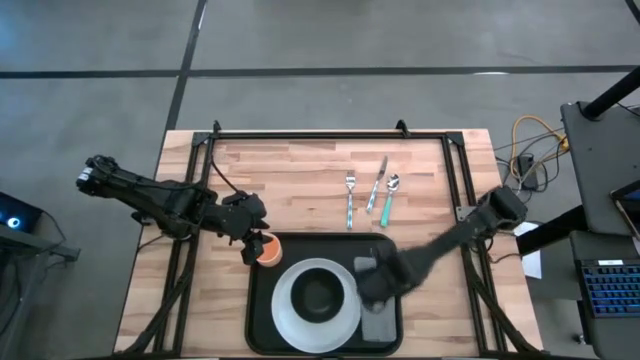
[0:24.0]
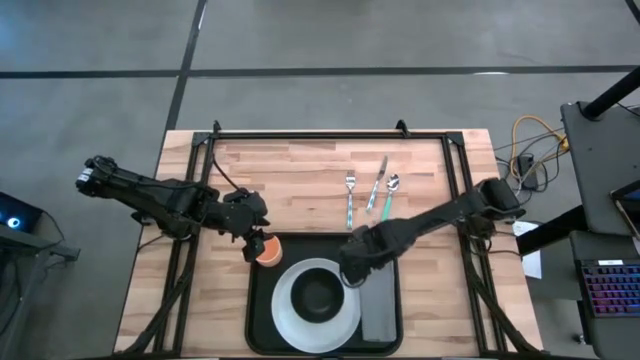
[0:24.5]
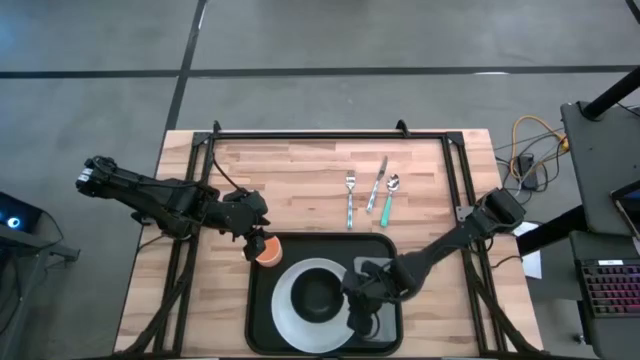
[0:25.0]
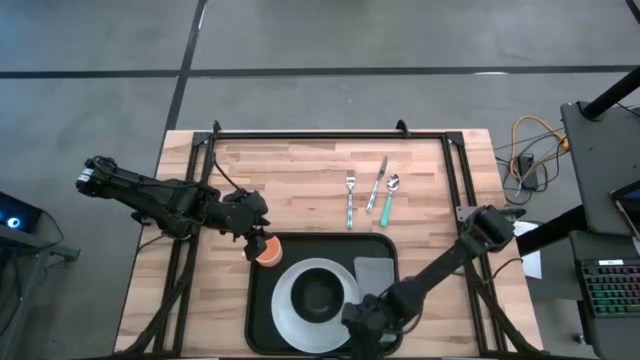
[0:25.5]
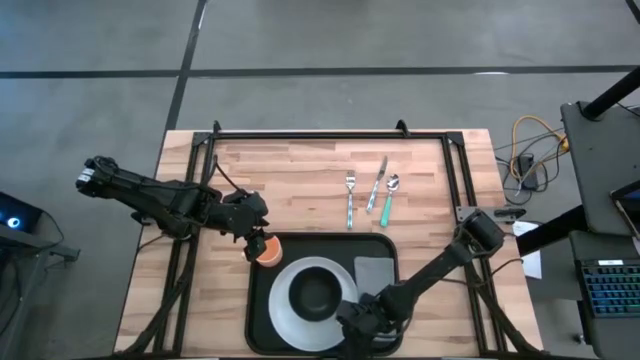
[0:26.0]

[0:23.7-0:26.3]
Task: Set up tray
Adjust the white plate

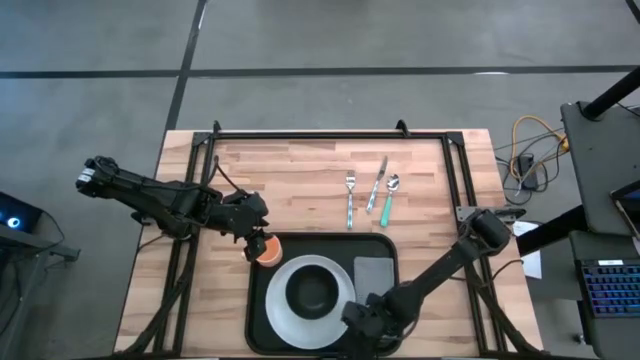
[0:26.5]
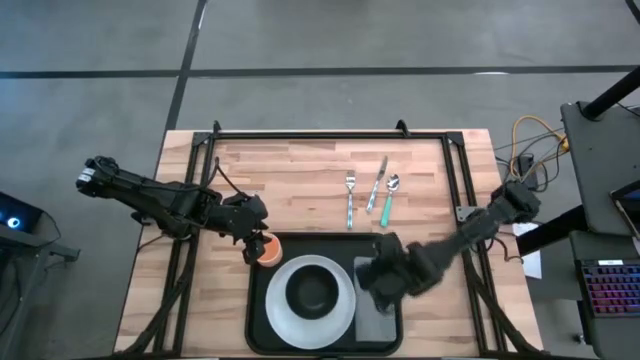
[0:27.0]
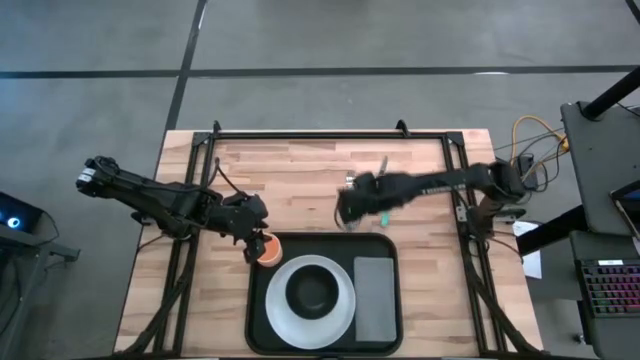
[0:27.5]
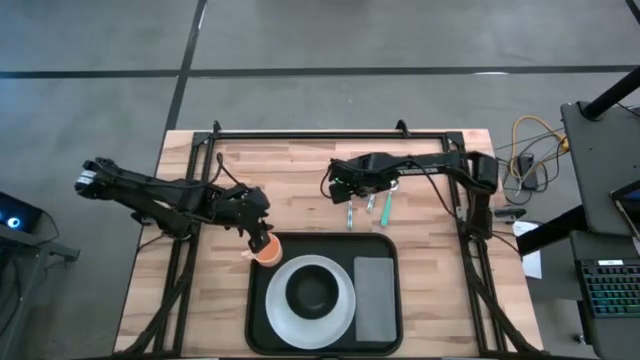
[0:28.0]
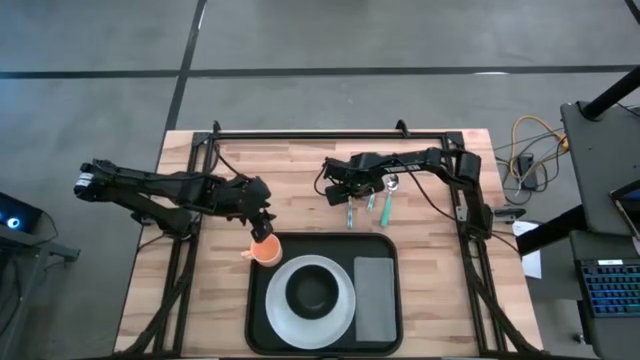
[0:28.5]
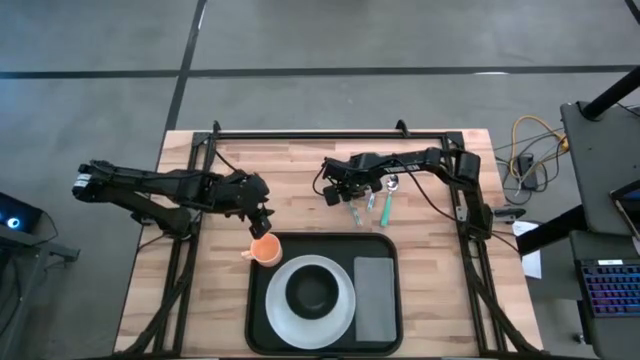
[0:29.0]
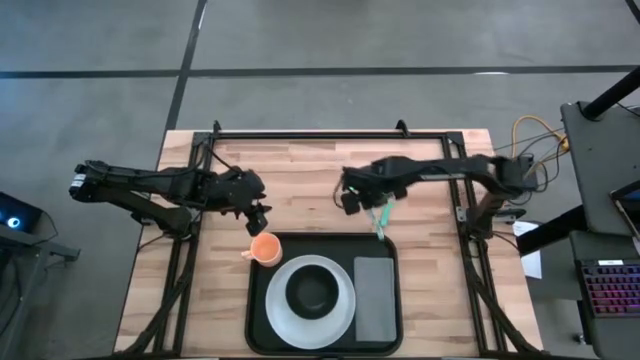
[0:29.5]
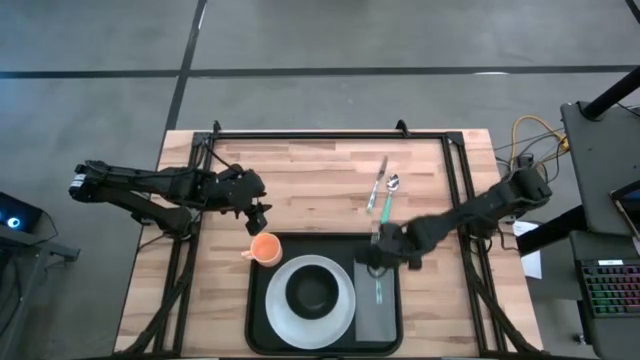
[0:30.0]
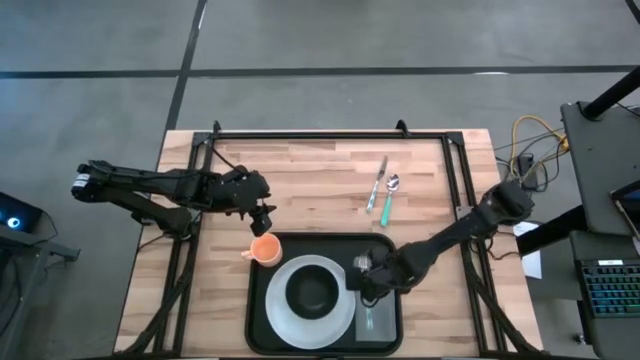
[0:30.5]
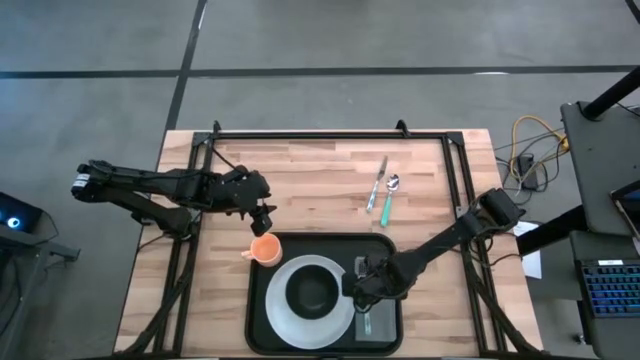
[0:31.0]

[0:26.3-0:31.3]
Put the blue fork on the gray napkin

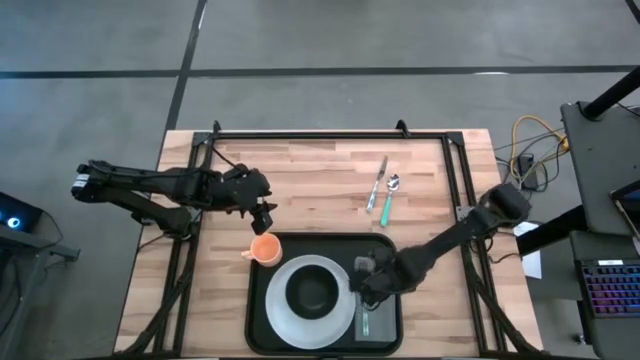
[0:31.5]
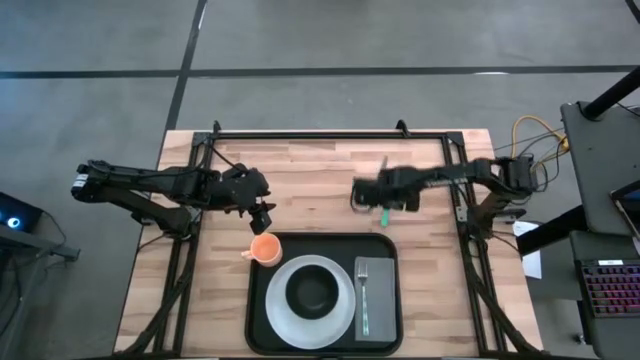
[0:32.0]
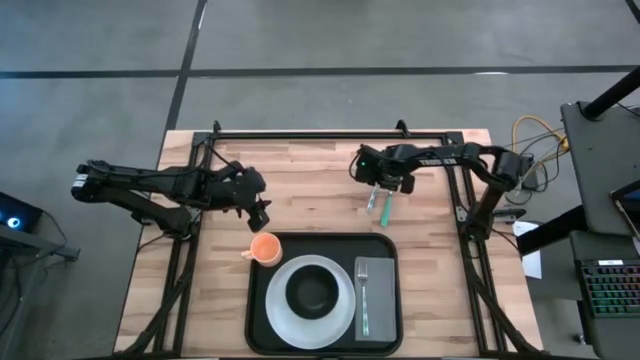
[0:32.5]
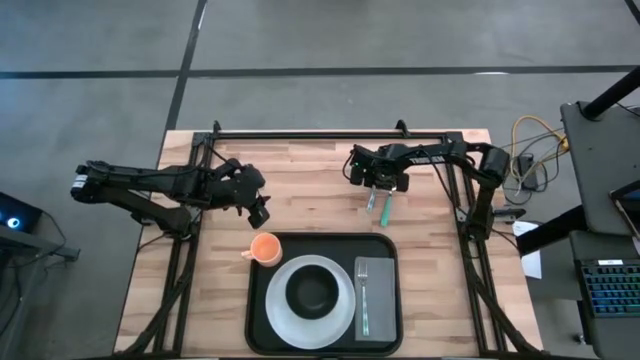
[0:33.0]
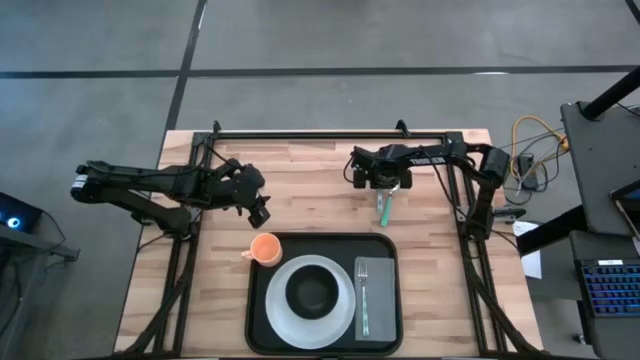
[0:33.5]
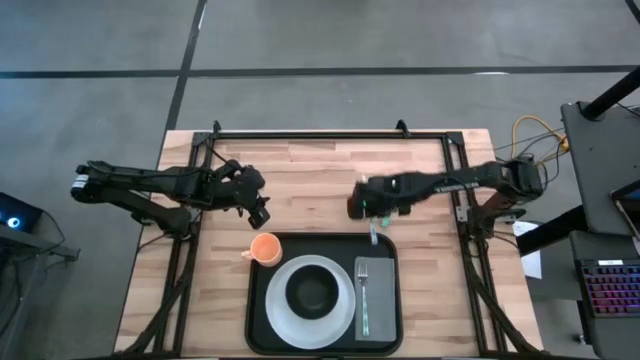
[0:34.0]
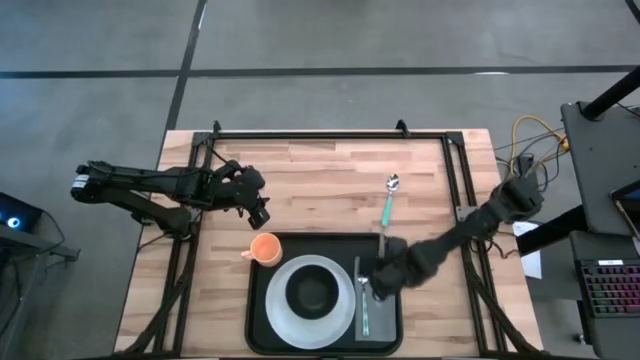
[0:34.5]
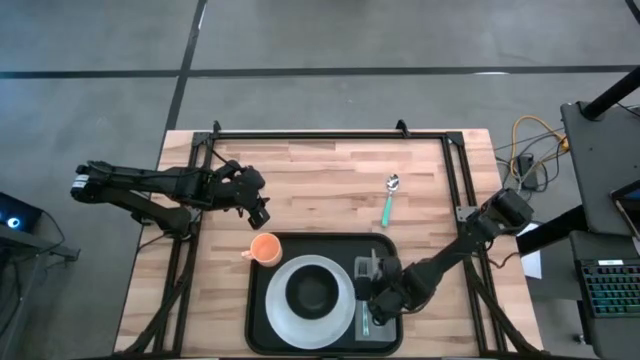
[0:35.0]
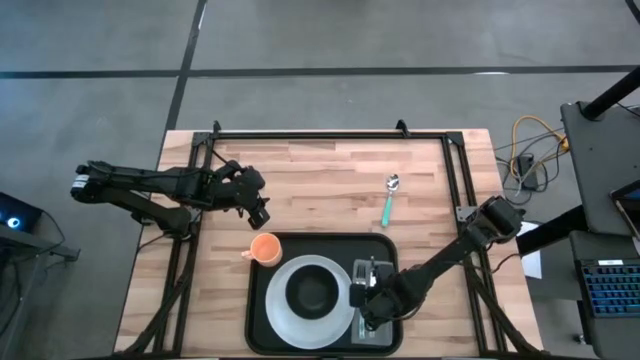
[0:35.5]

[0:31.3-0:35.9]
Put the blue knife on the gray napkin beside the blue fork

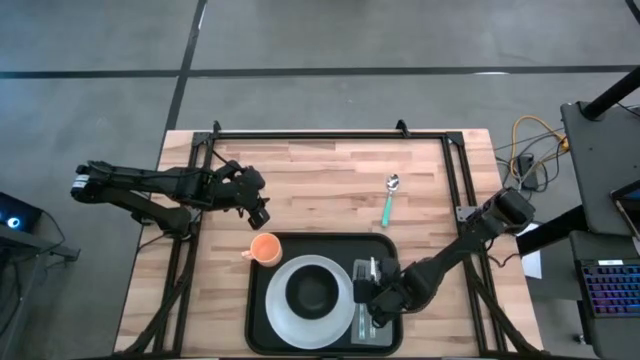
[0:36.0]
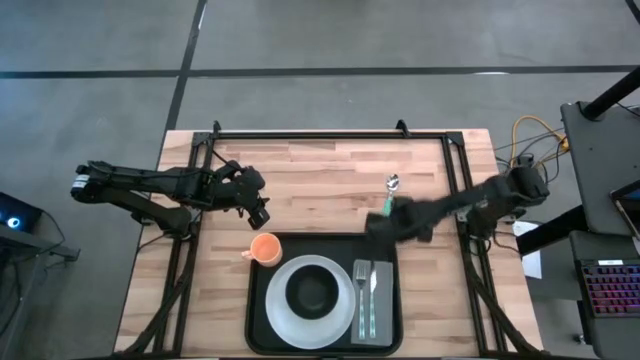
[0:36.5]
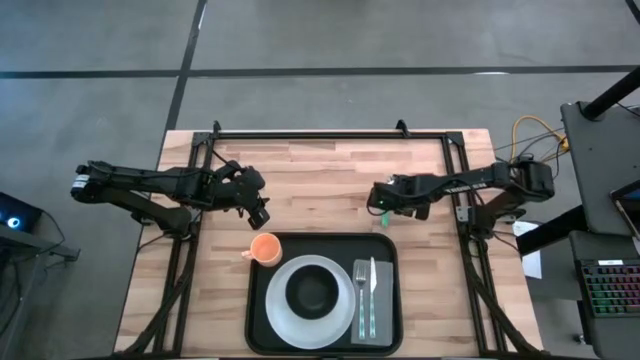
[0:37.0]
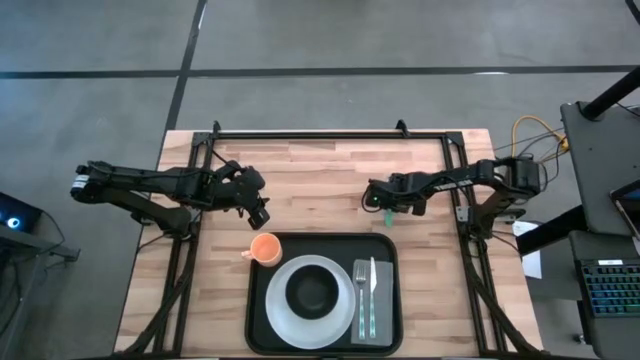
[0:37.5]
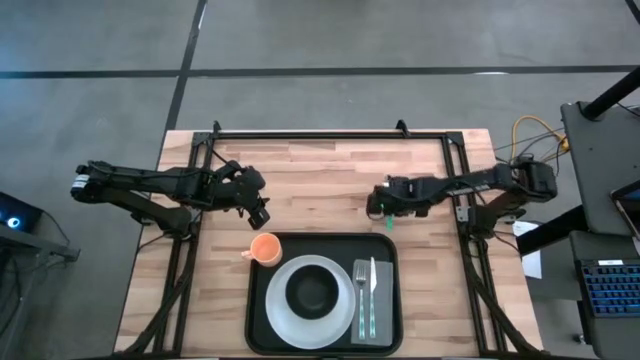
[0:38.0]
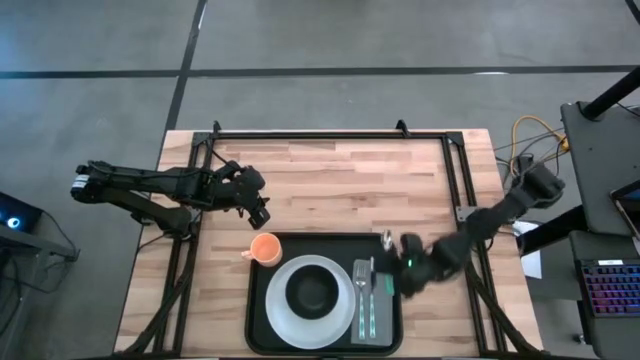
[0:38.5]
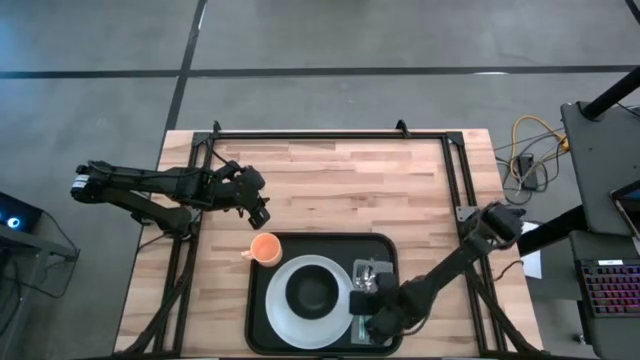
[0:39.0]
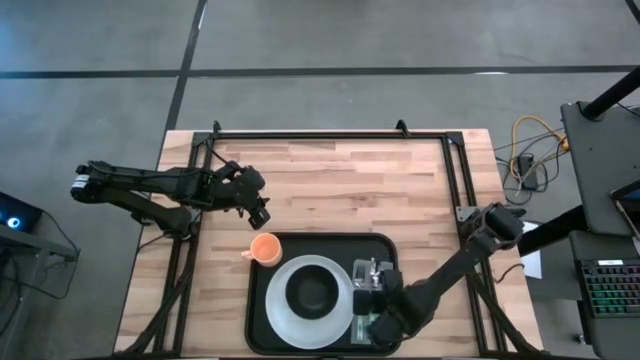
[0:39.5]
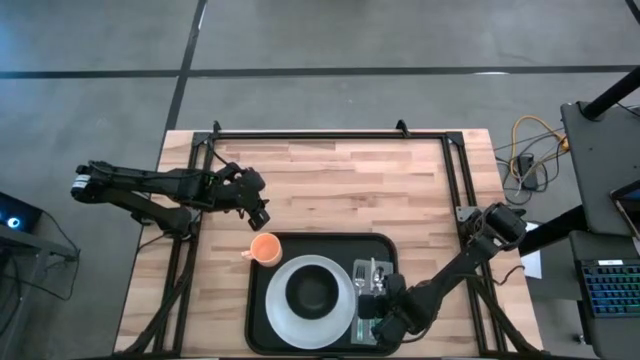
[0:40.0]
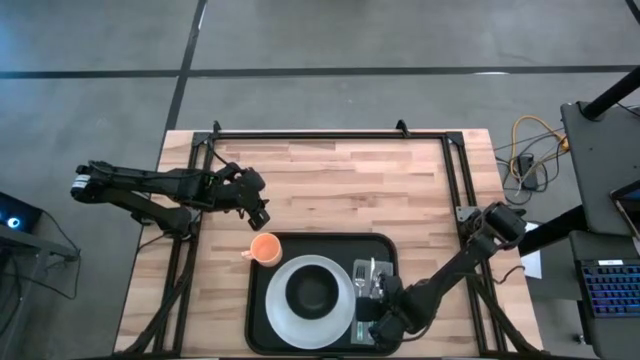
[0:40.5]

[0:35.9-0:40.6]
Put the green spoon on the gray napkin to the right of the blue knife

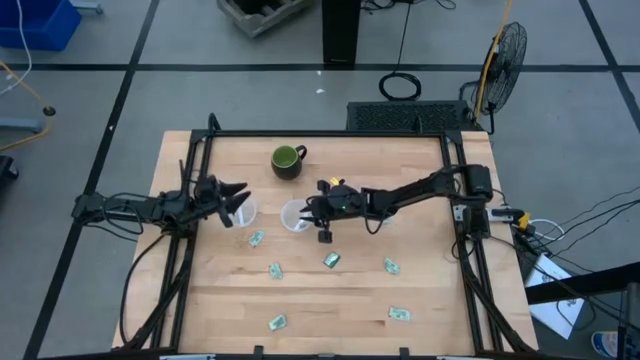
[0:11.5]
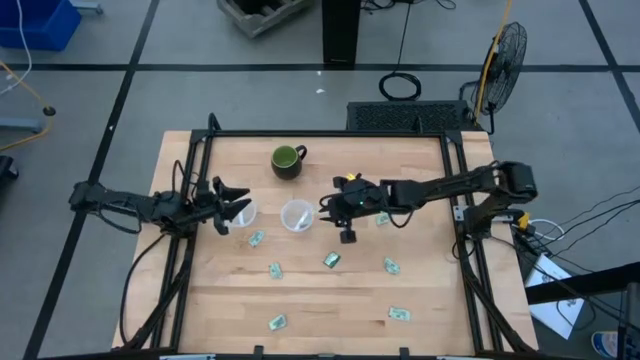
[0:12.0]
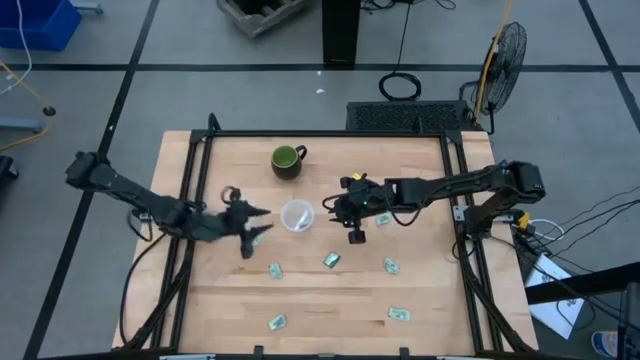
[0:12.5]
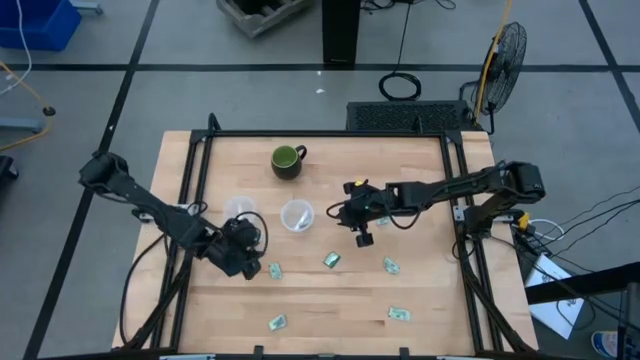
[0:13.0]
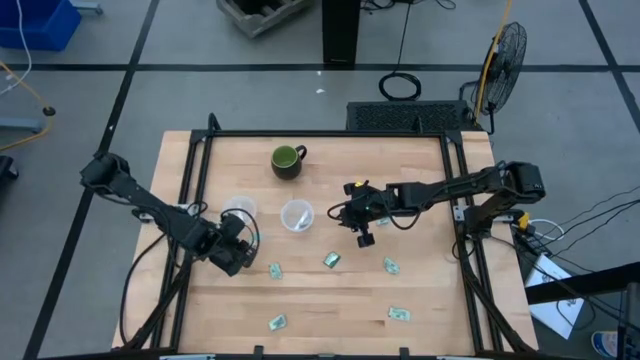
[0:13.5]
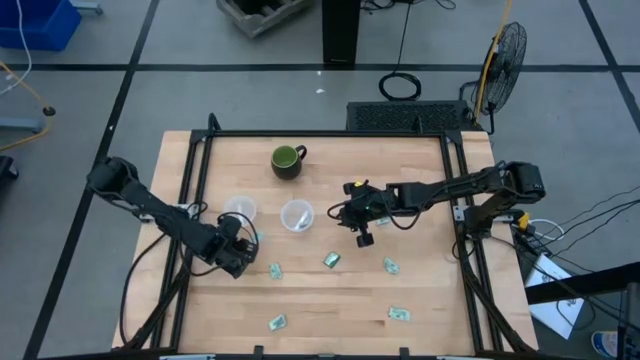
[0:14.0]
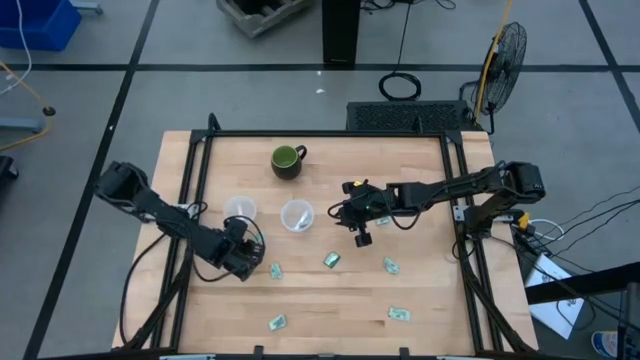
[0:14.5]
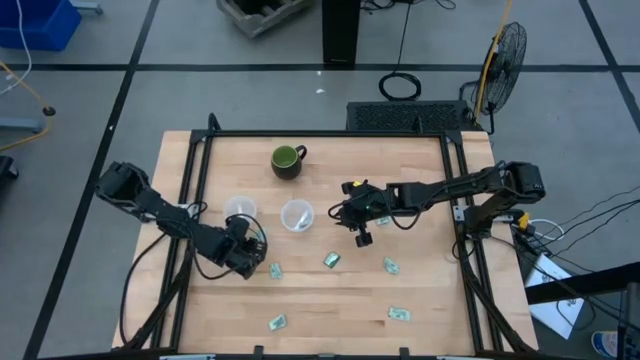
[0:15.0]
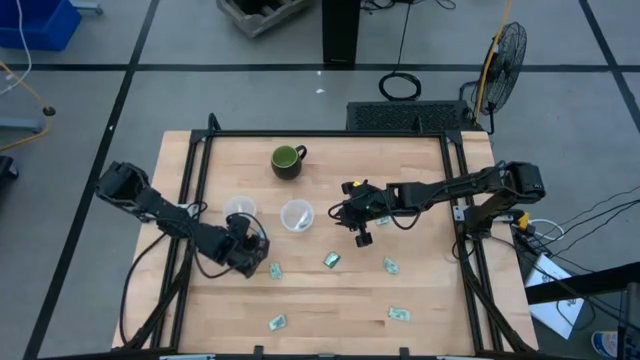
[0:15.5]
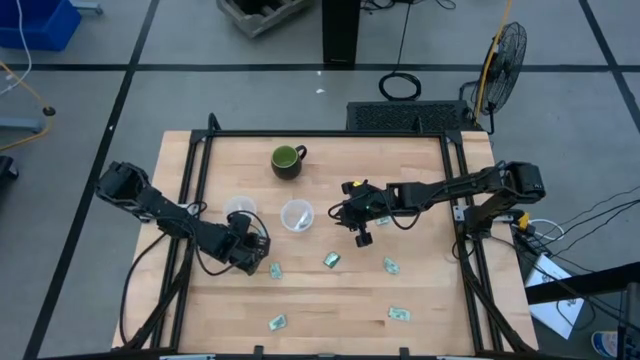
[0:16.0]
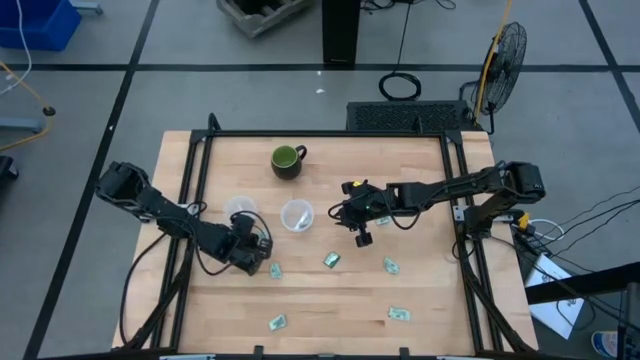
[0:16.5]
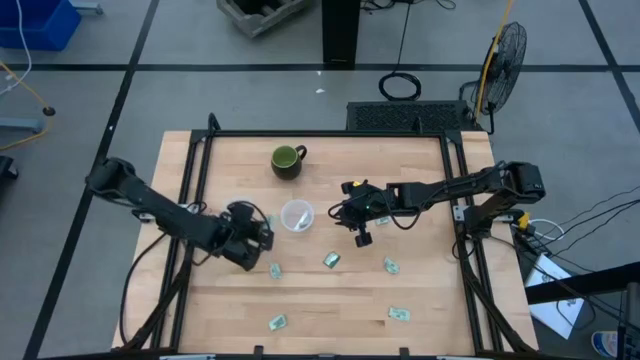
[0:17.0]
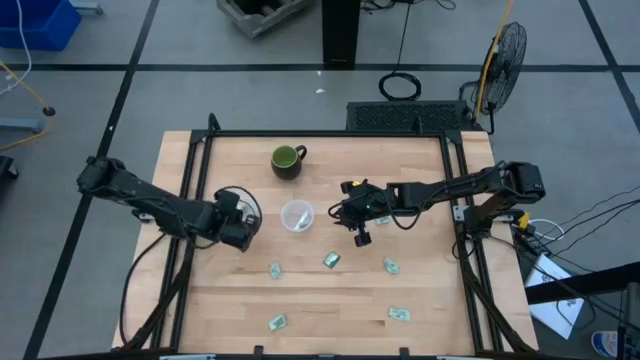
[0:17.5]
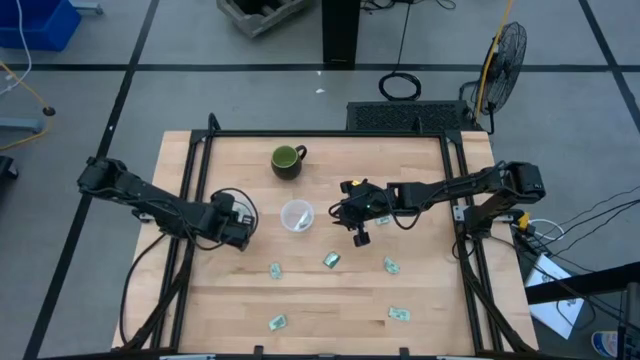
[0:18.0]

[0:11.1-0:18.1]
Task: Pick and place Stevia / Truvia into bins
Put the stevia pocket in the left plastic container
